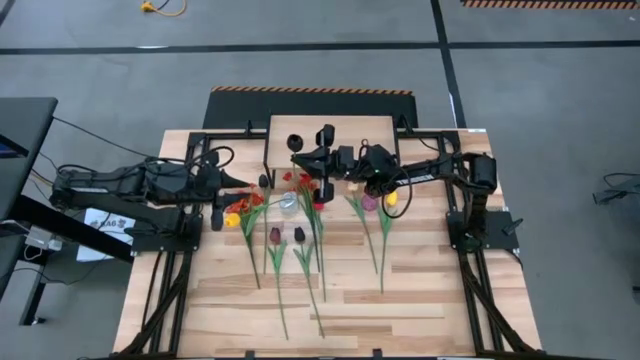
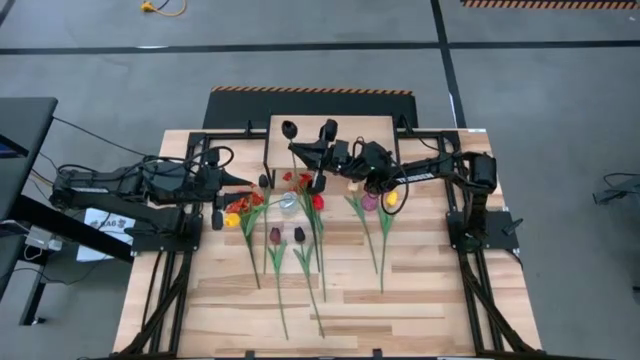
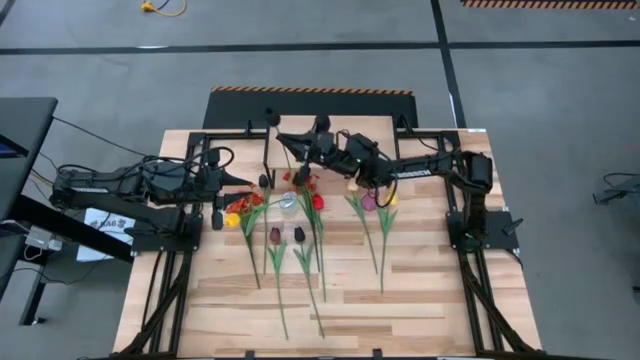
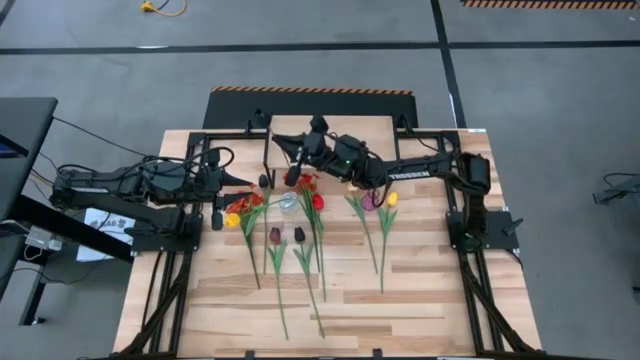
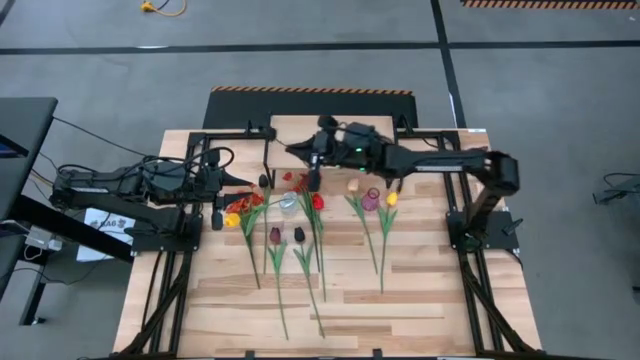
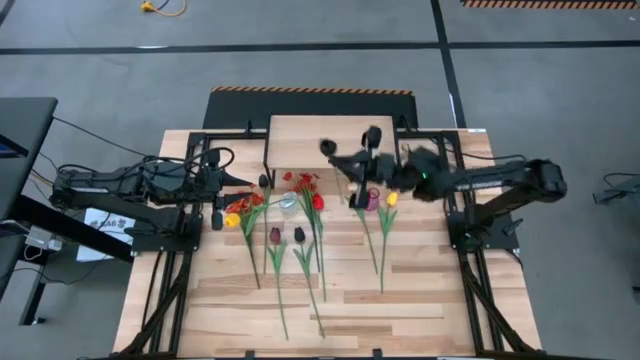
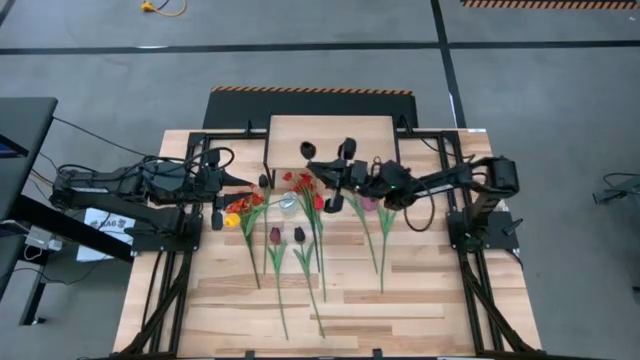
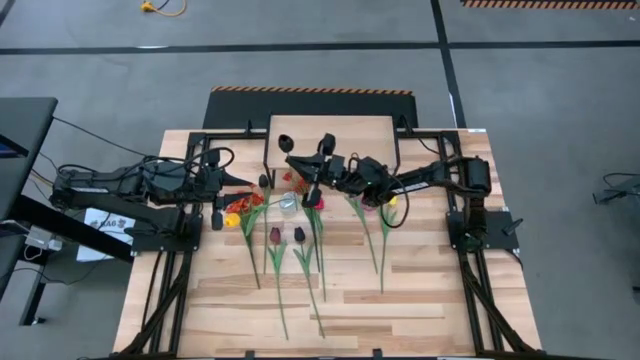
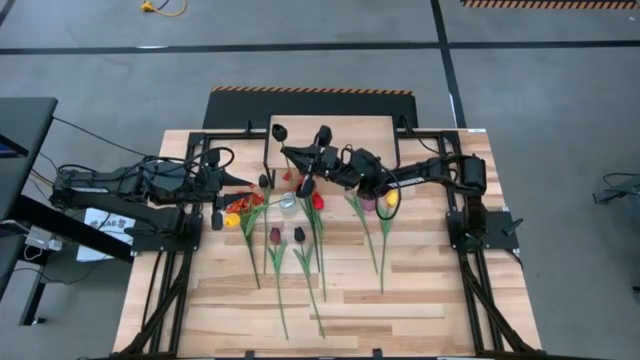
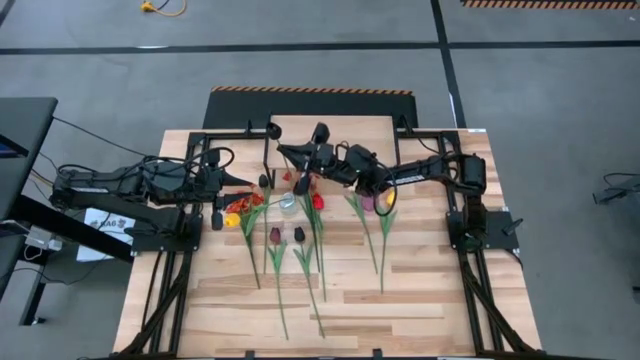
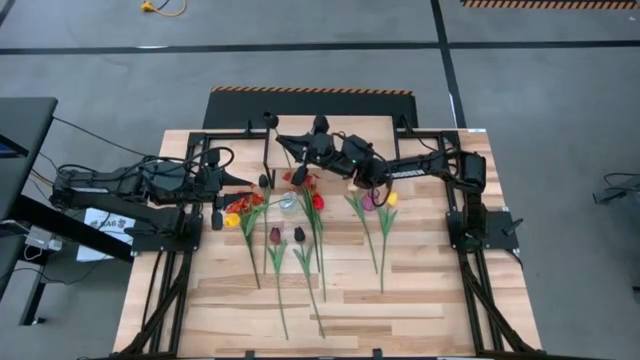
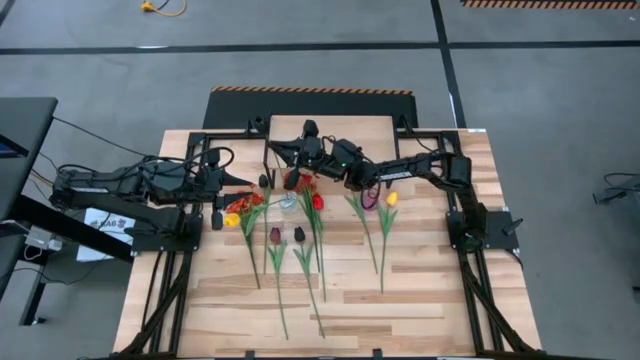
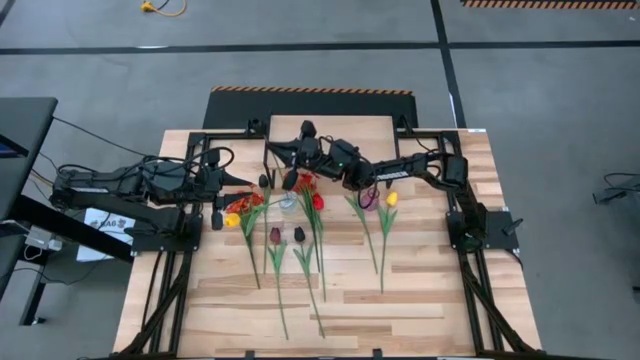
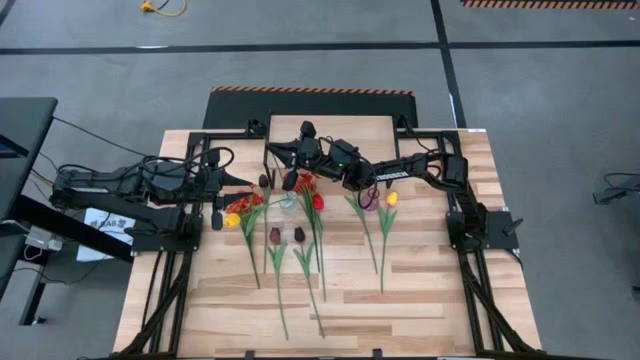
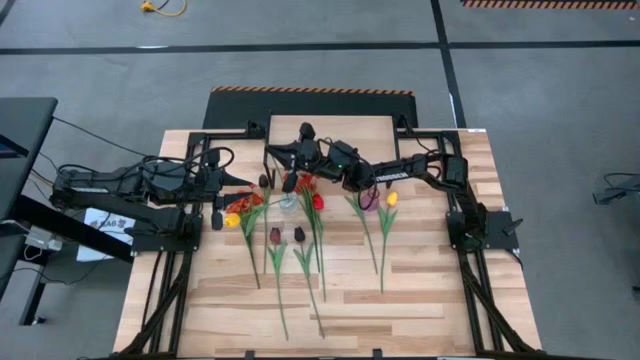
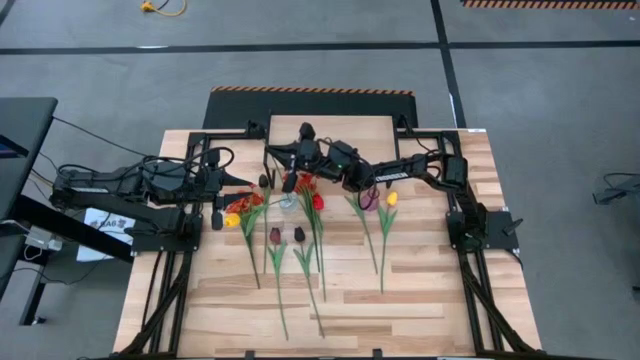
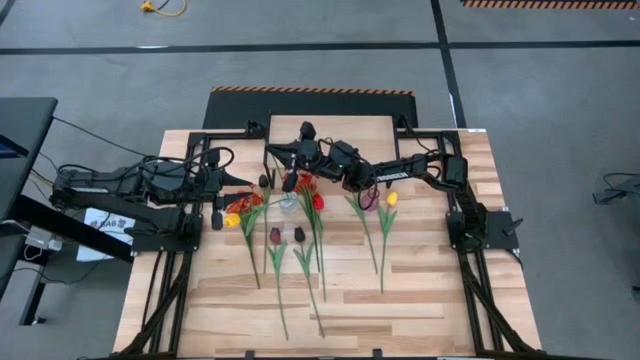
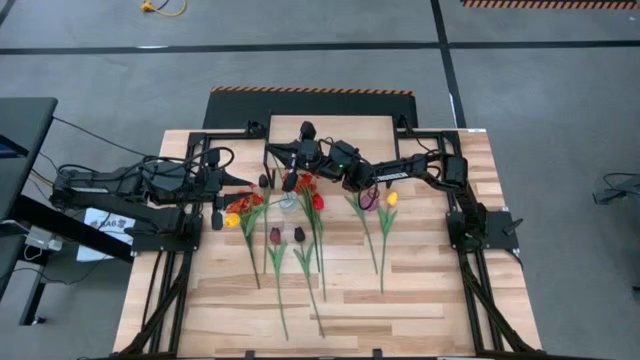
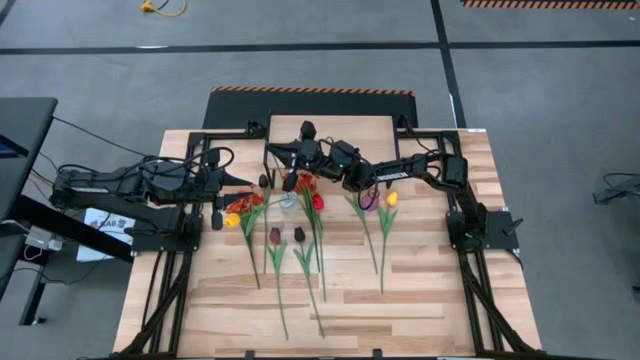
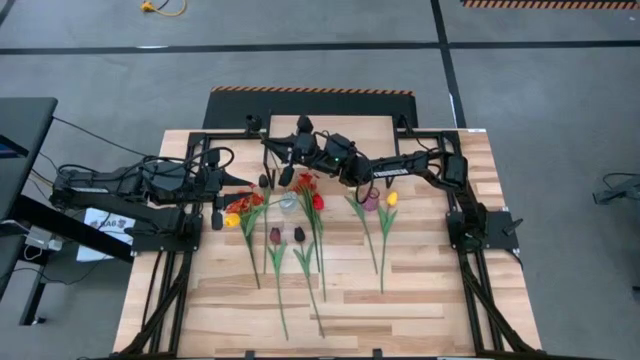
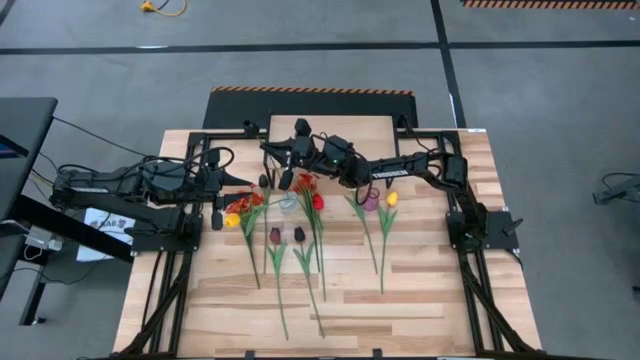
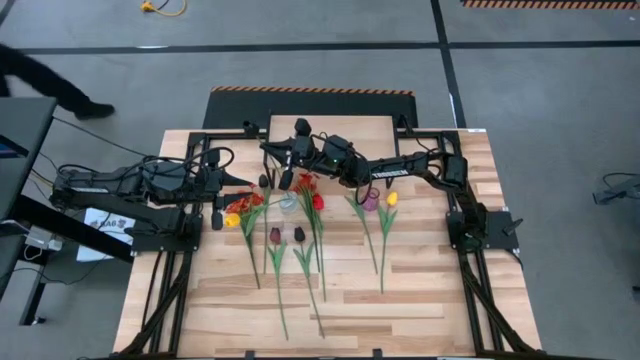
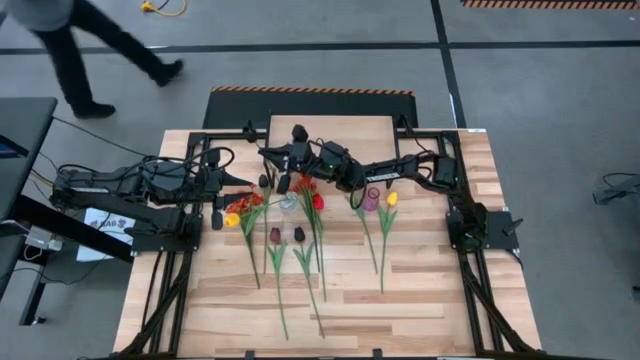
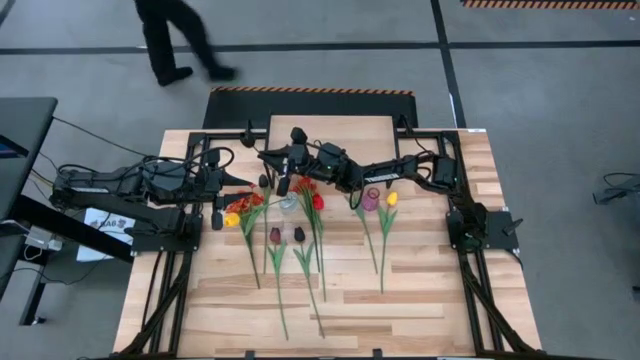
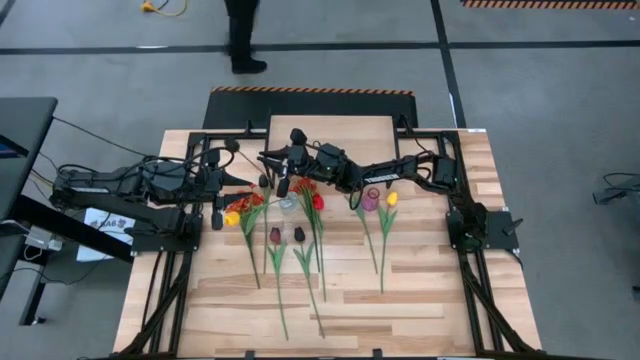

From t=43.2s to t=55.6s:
Task: Pick and place flowers into a vace then onto a shelf
Put the right black flower into the transparent vase

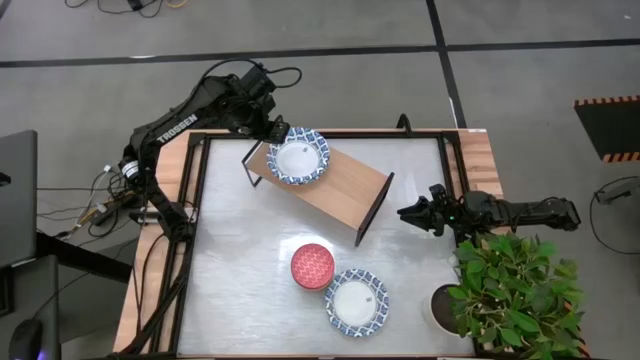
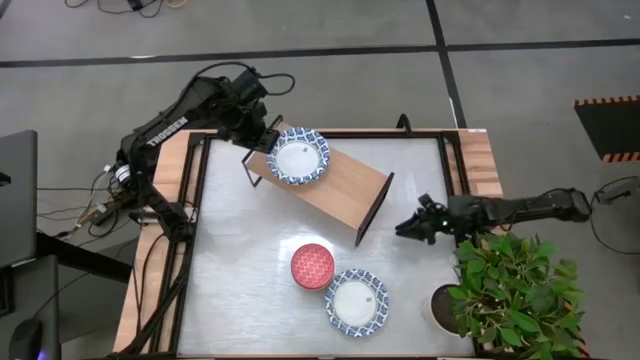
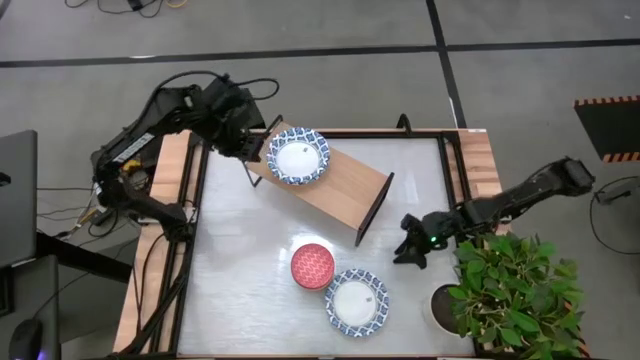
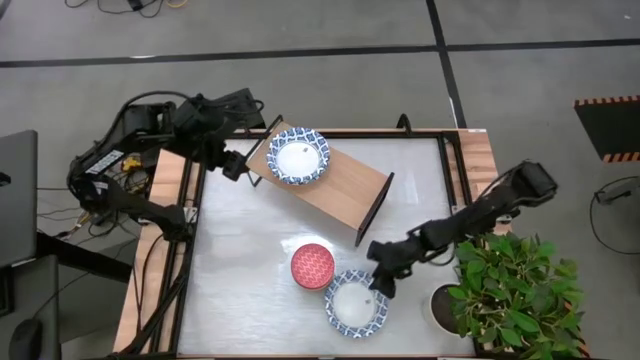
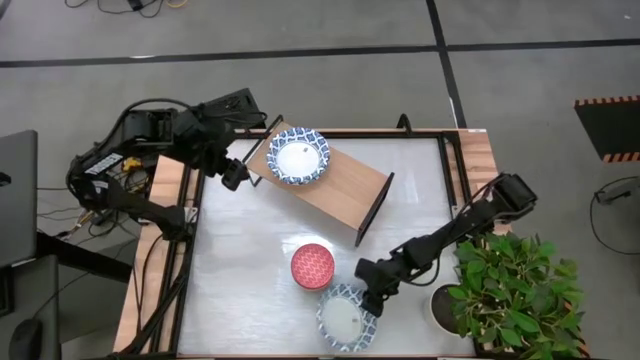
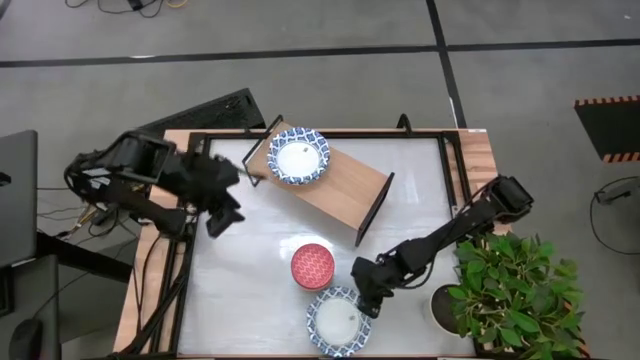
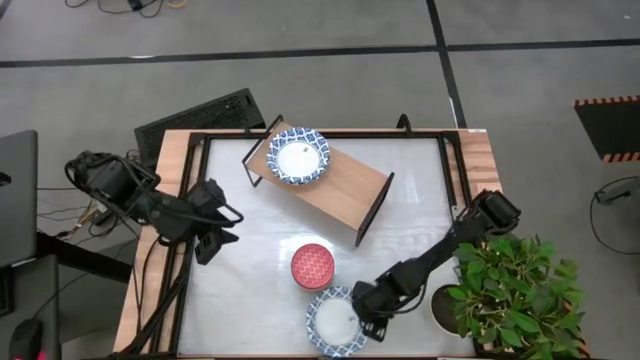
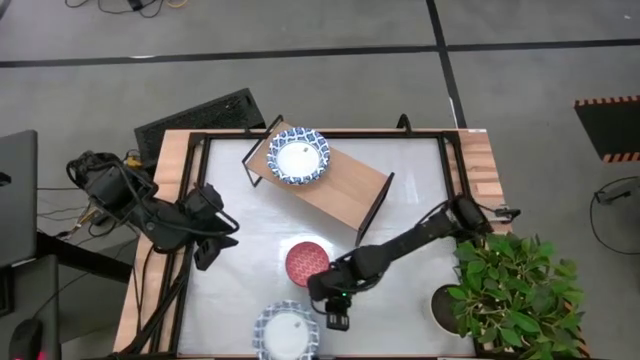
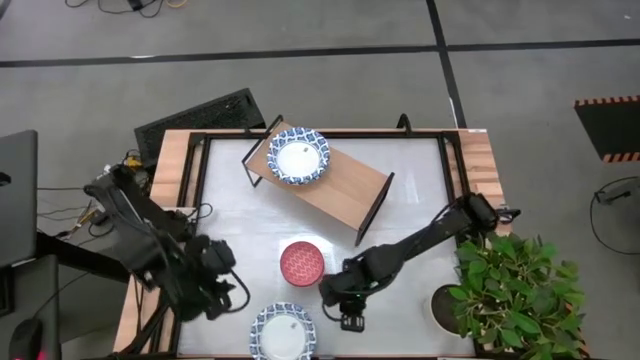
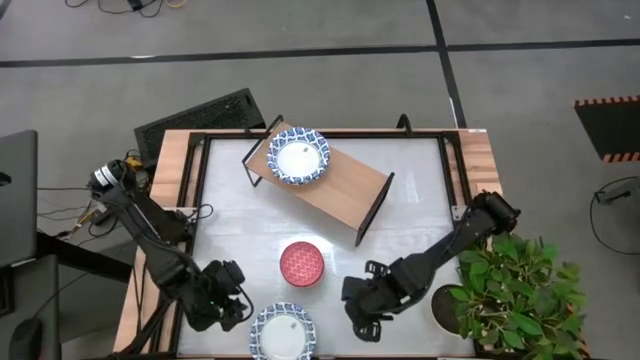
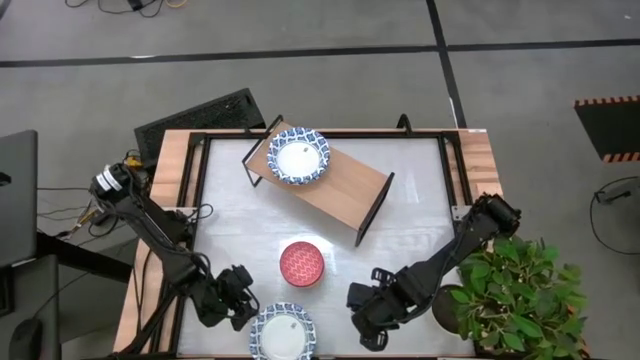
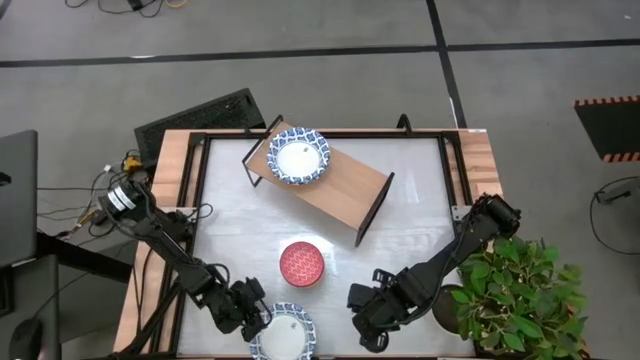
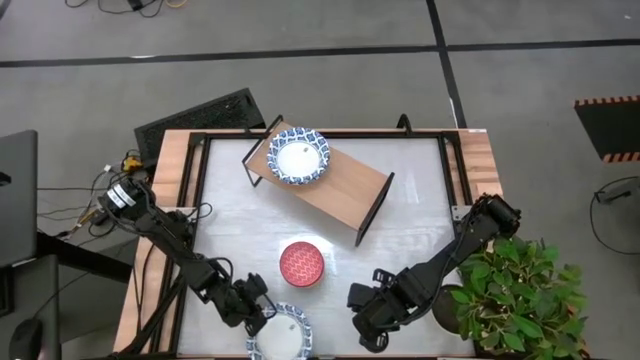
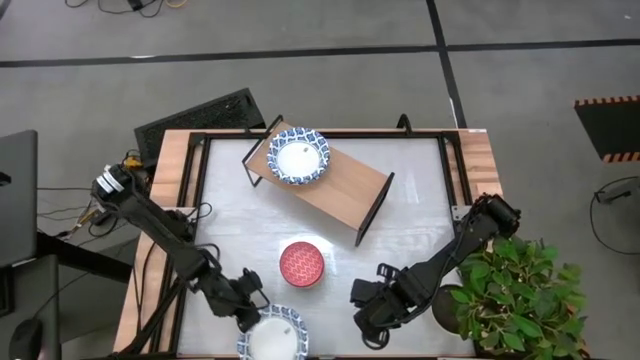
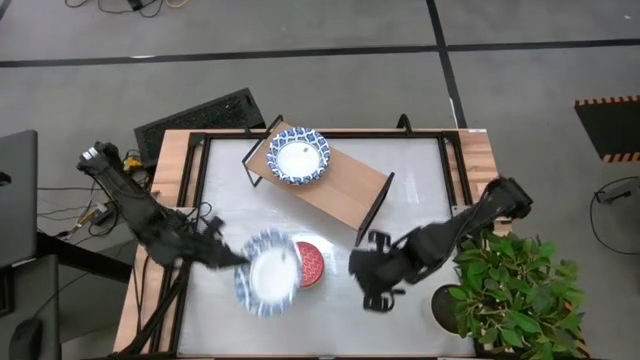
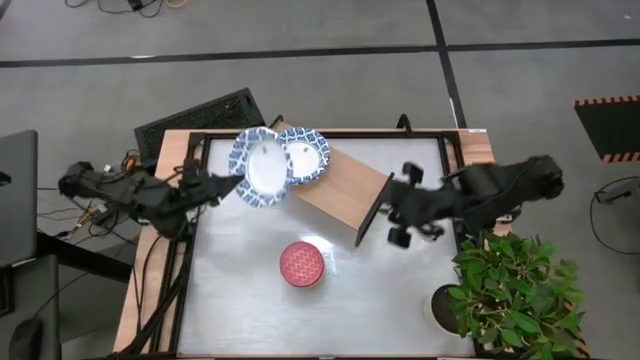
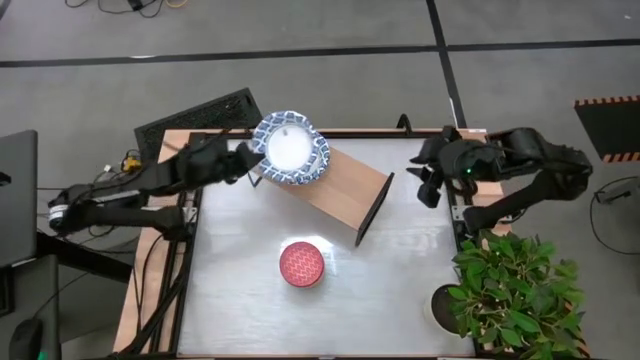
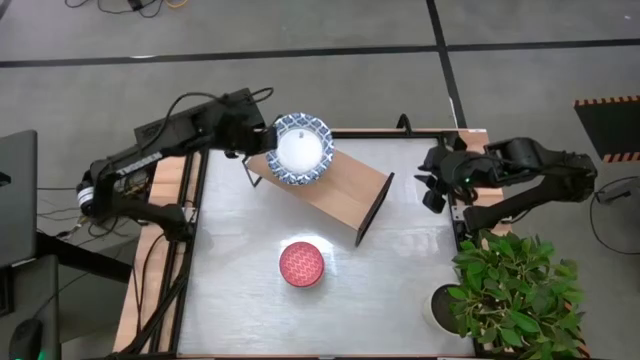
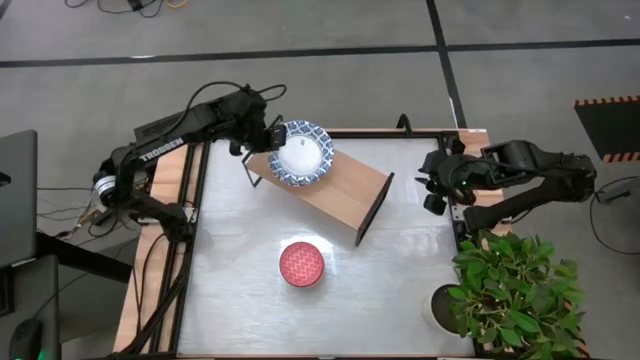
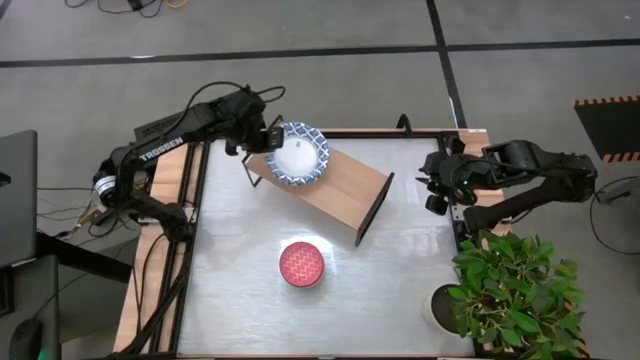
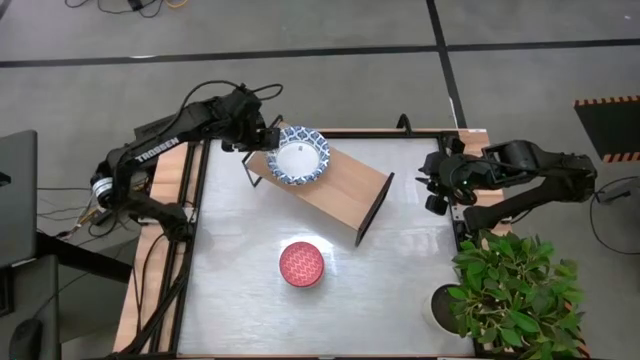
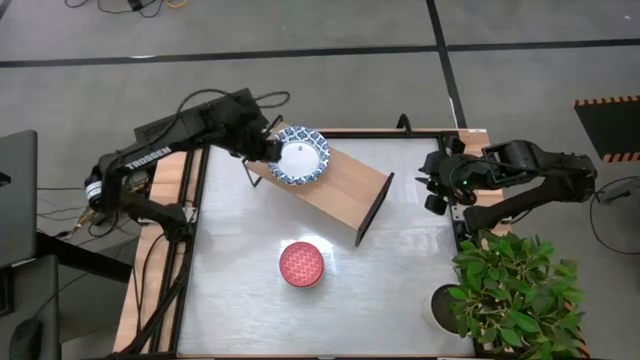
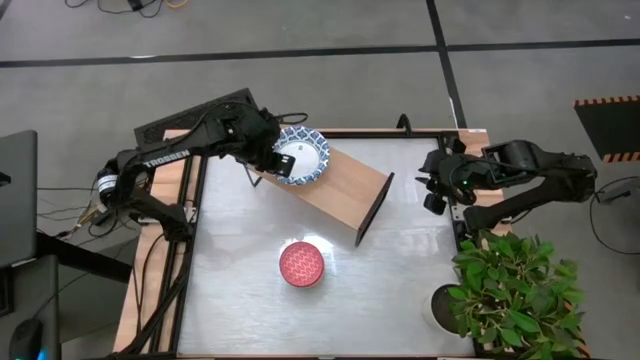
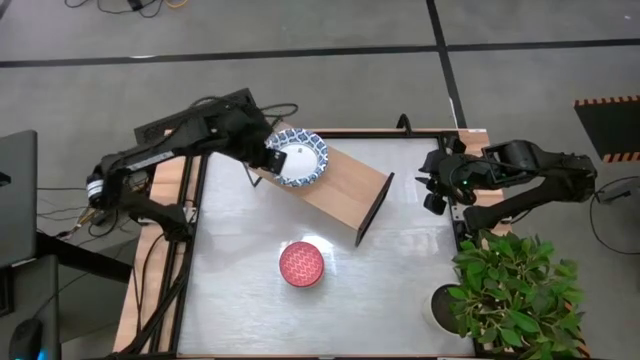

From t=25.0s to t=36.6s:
Task: Place and stack bowls onto a shelf
Stack the white bowl on top of the white bowl on the shelf
